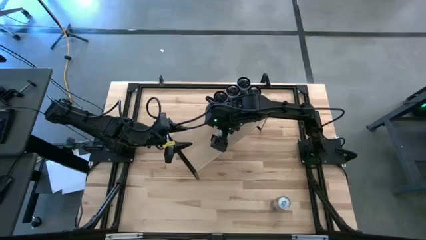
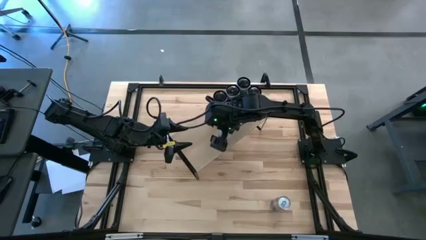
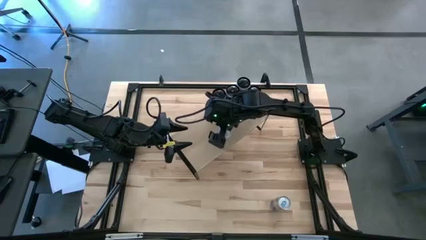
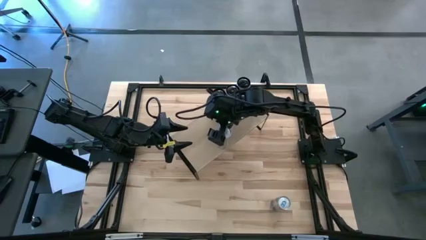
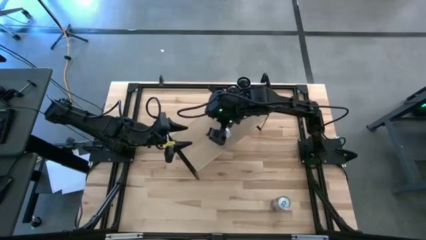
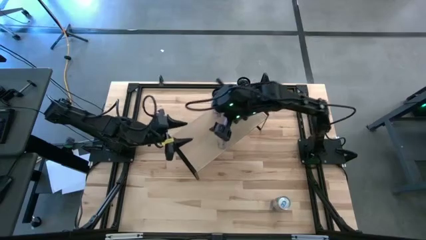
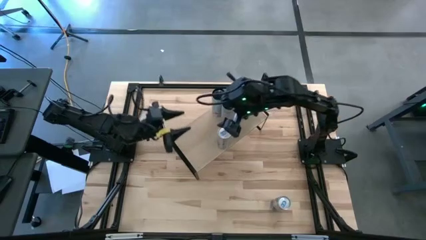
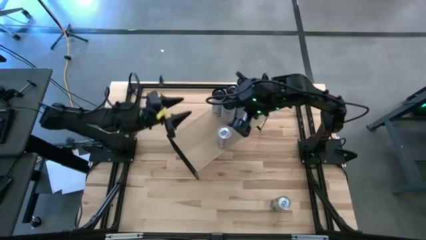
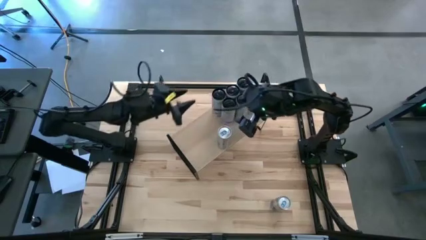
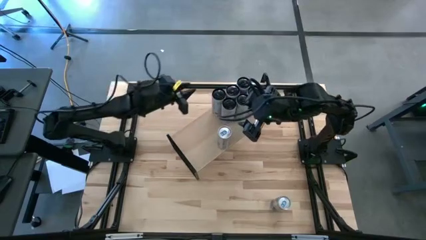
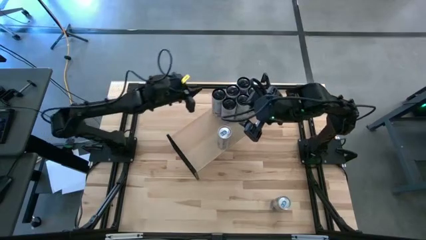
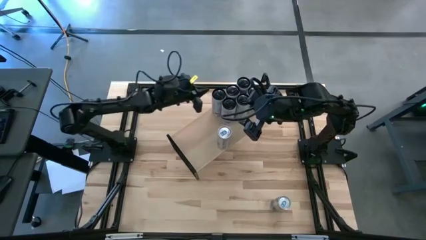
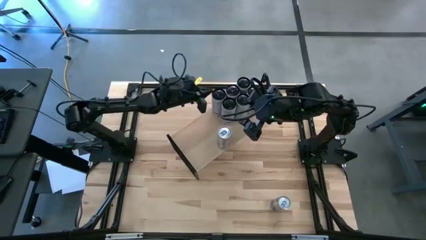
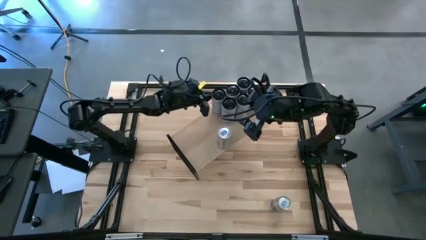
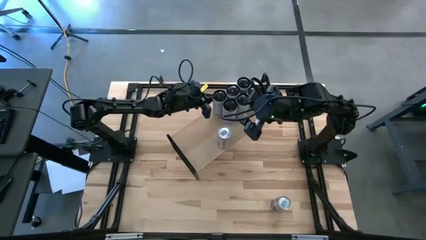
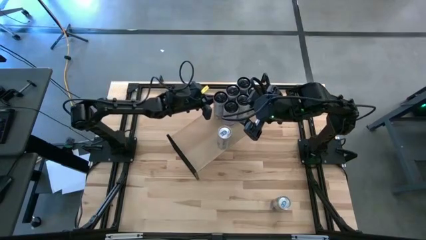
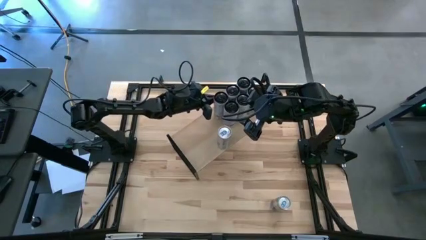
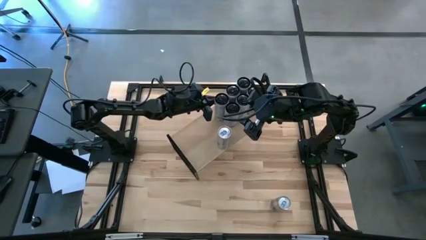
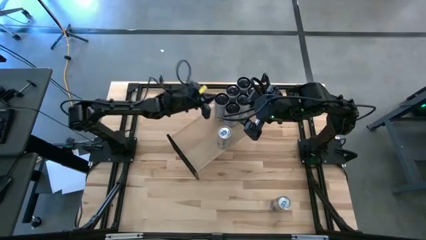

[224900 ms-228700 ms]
Task: Place canned beverage on shelf
Adjust the white-pink soda cans on the shelf

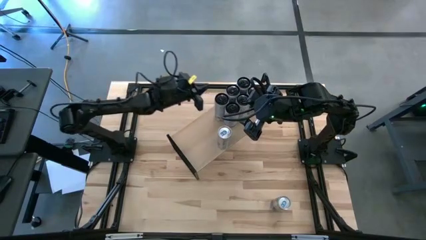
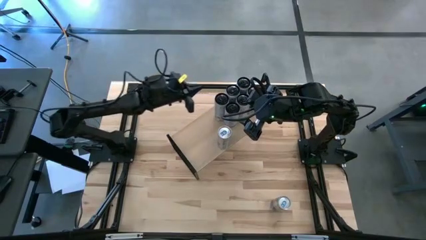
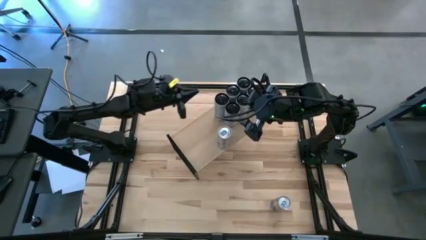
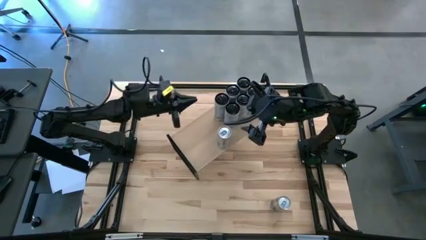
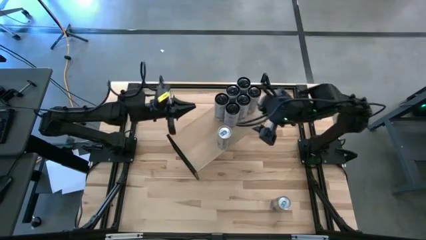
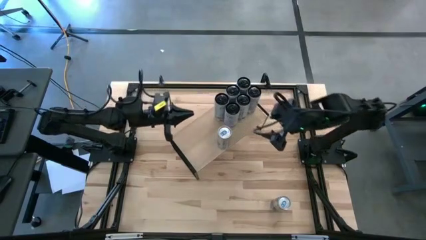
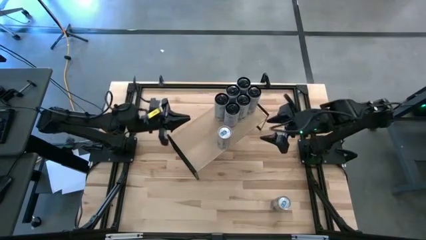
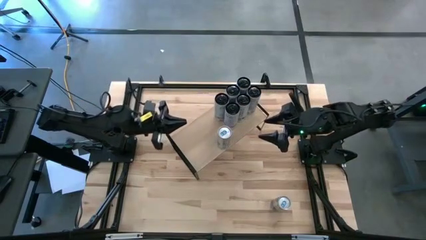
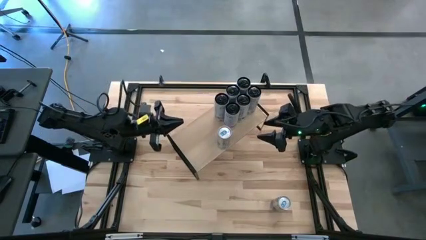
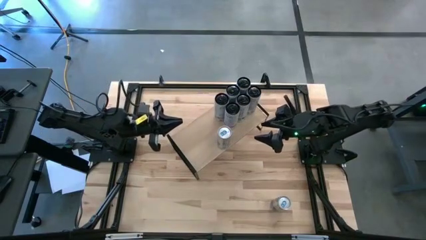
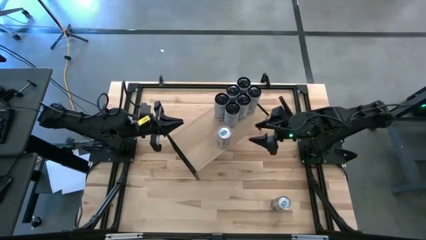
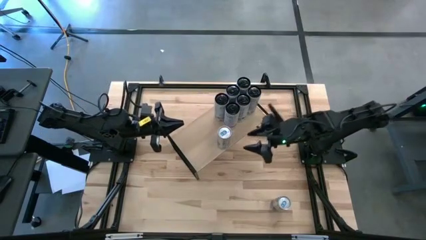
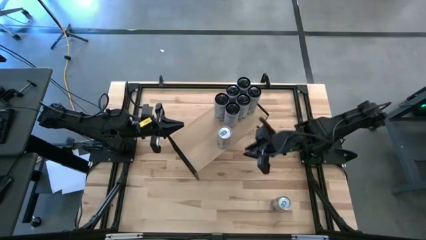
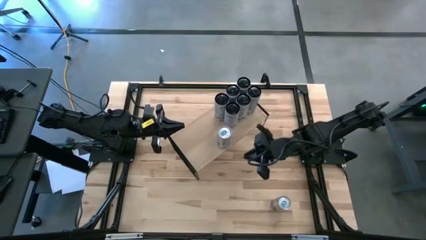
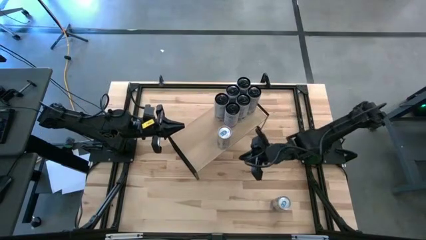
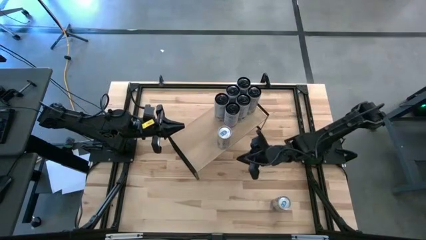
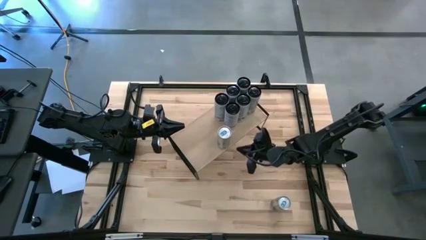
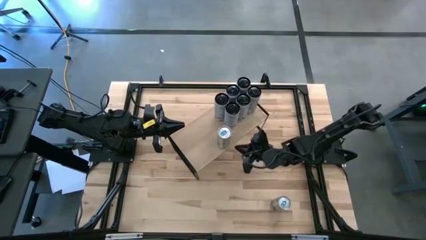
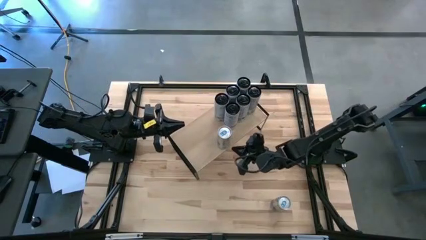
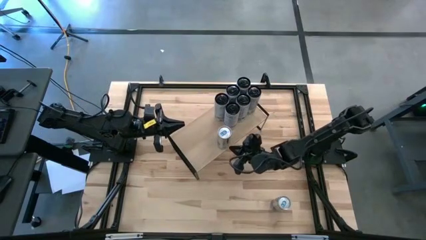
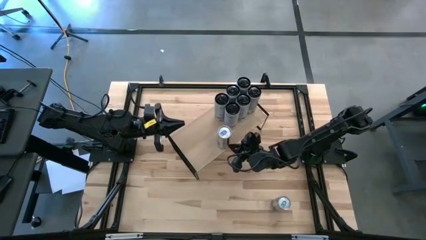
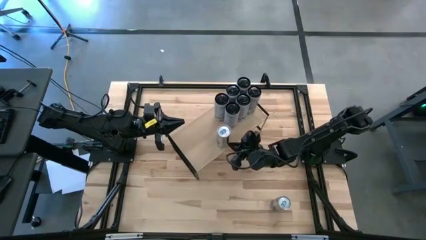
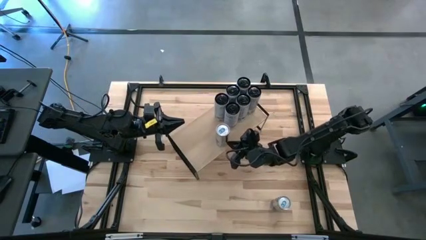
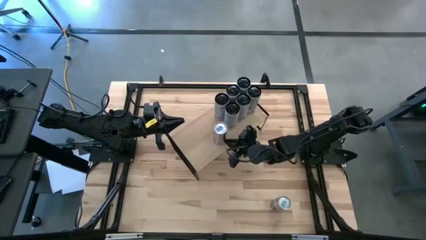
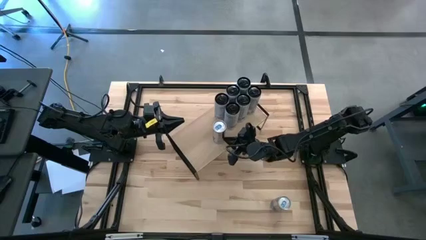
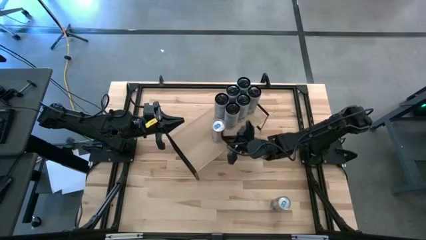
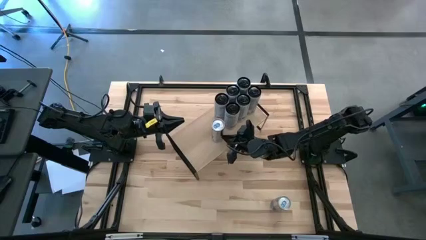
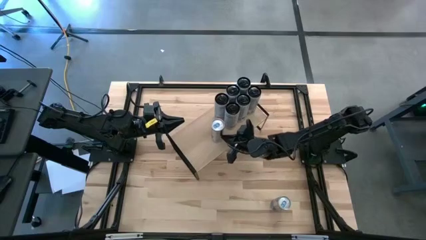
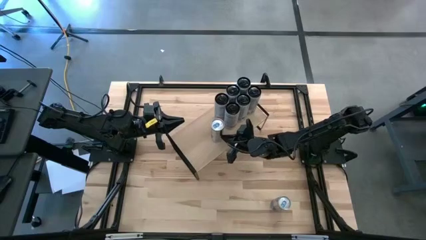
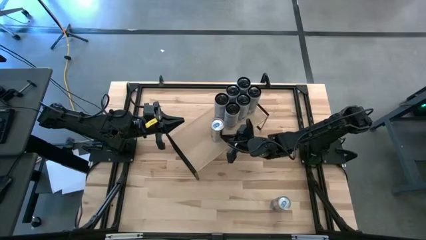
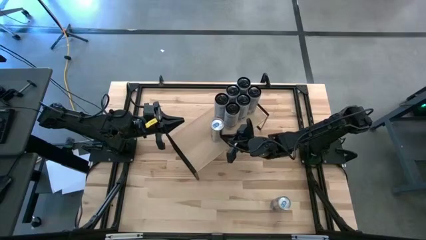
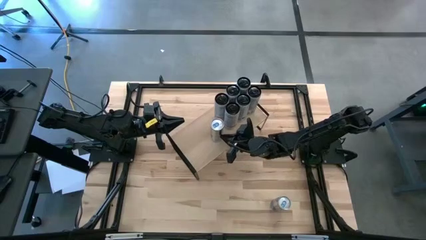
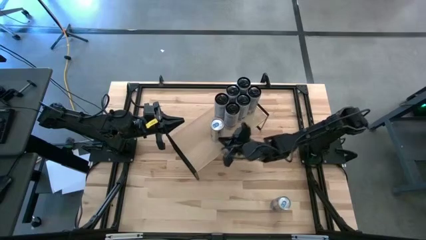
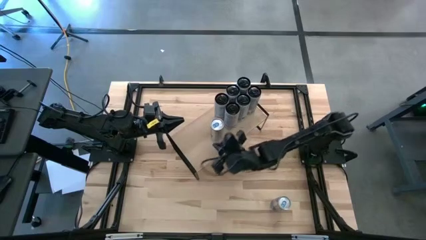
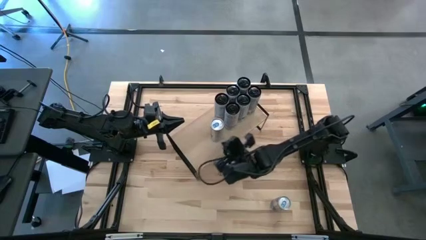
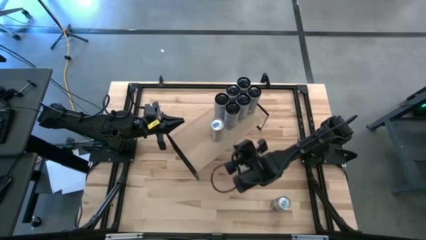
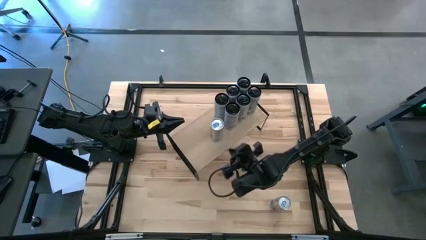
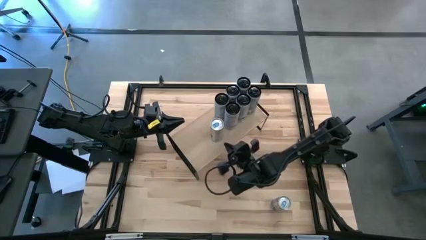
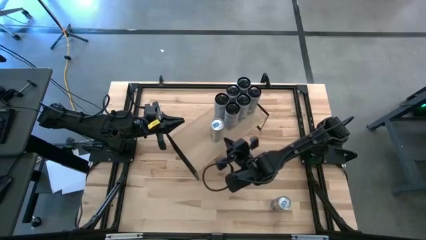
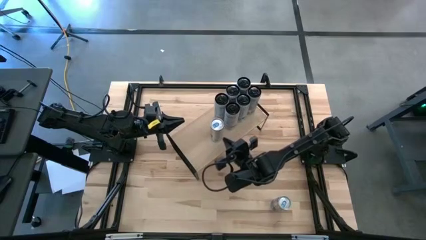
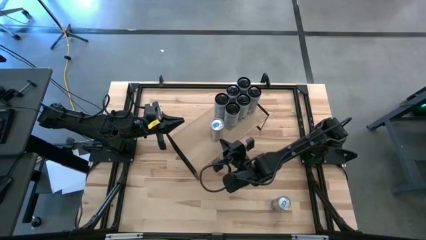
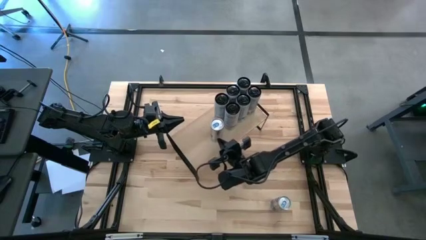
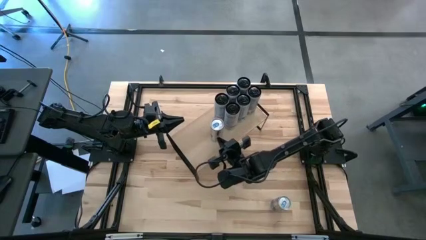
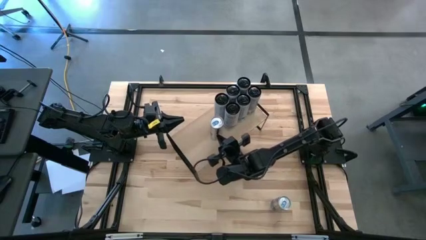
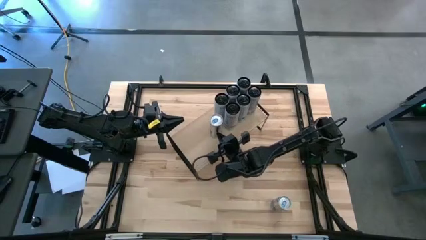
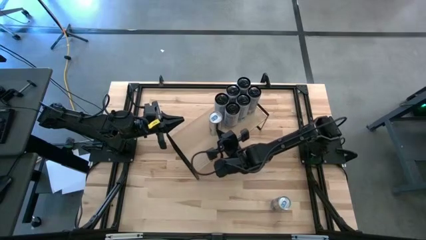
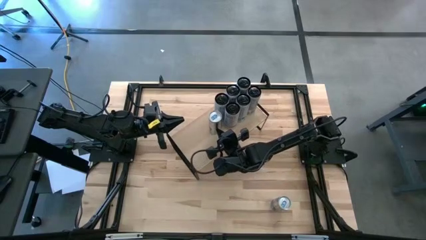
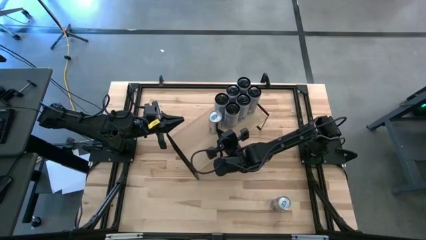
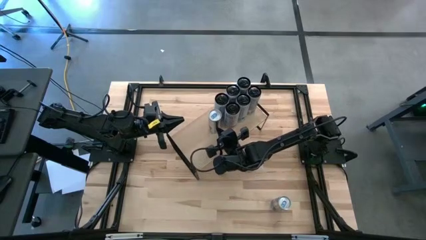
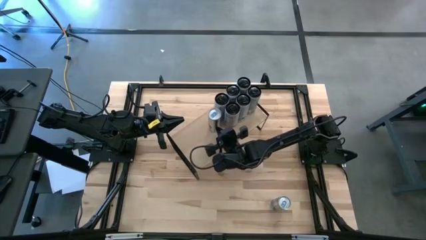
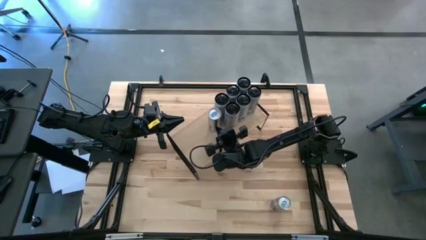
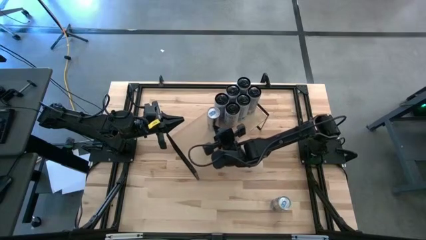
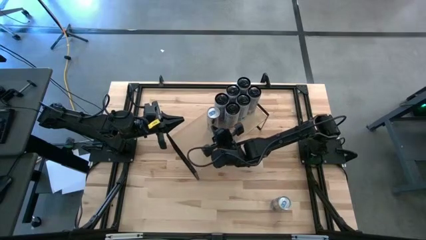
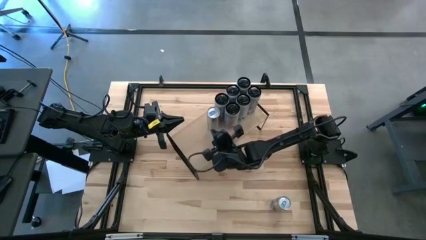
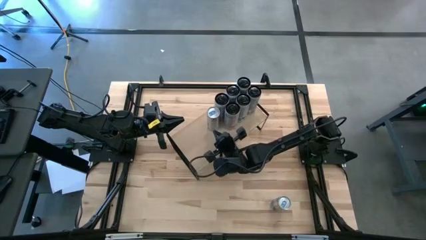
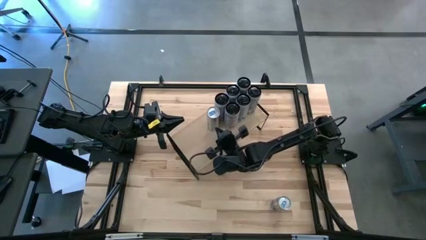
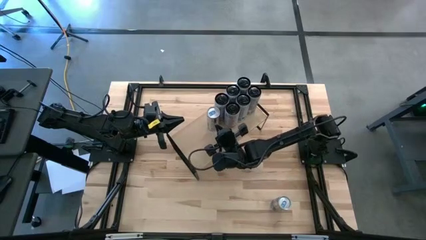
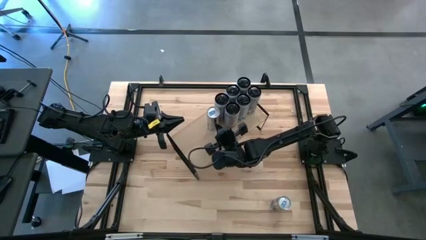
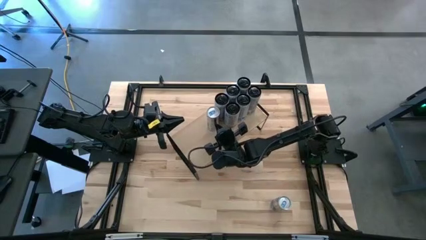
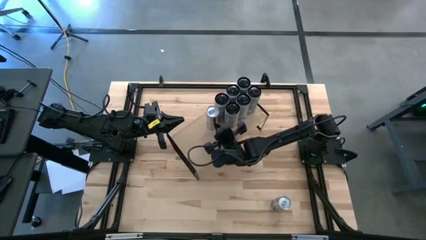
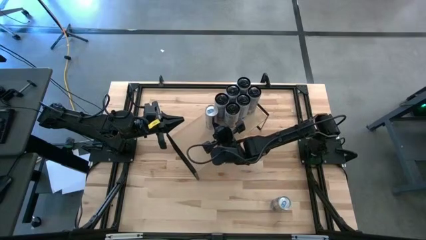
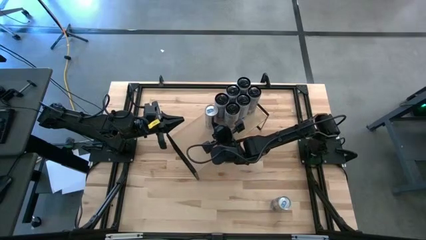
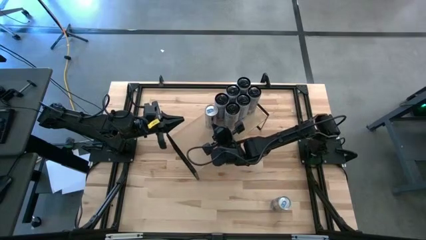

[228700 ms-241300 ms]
Adjust the blue soda can on the shelf
